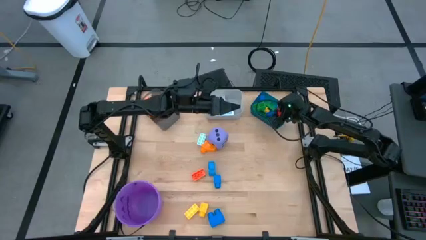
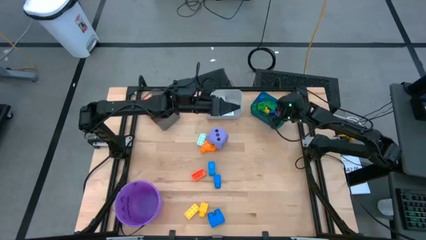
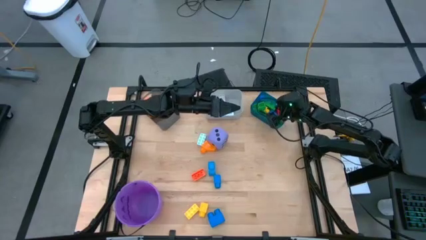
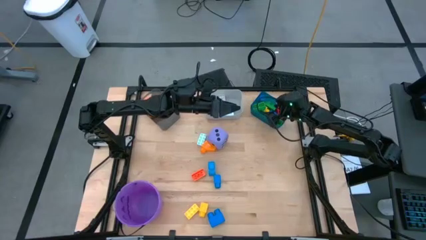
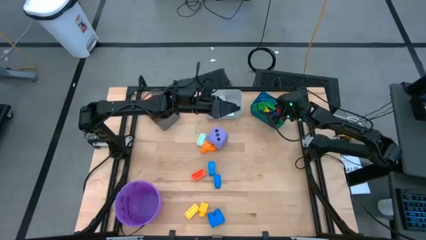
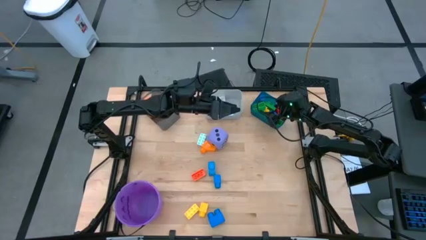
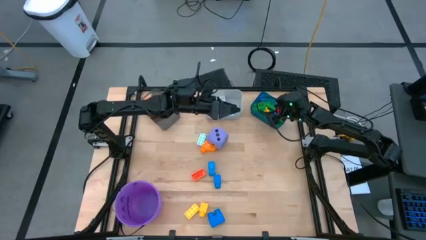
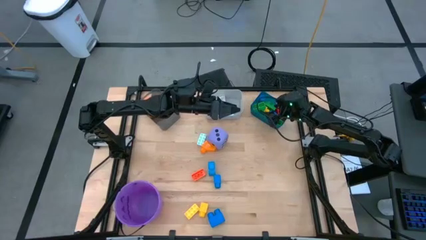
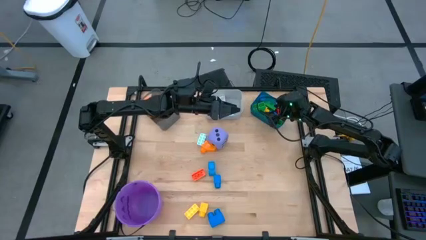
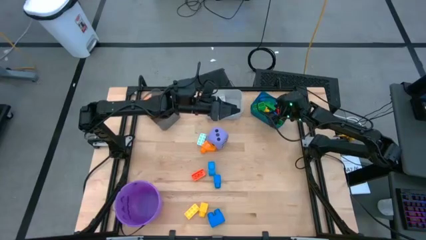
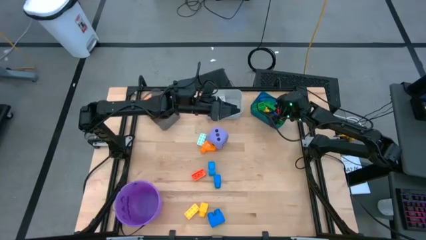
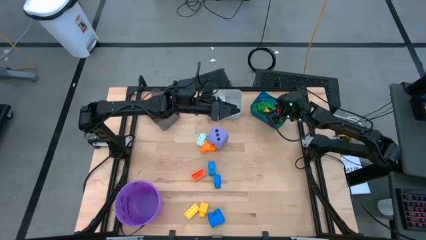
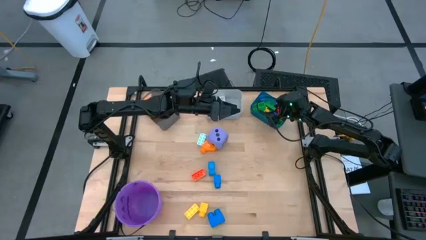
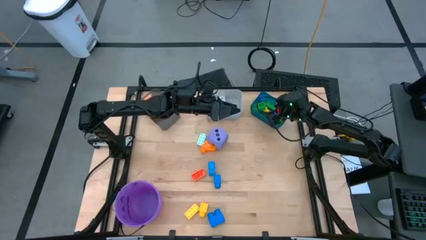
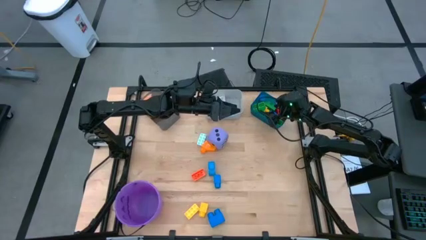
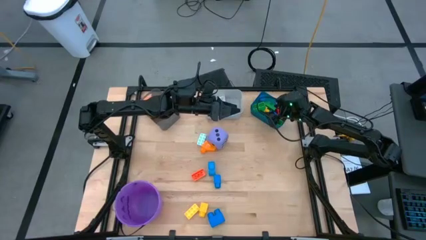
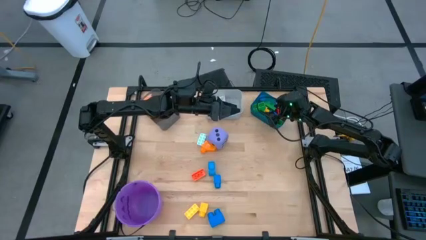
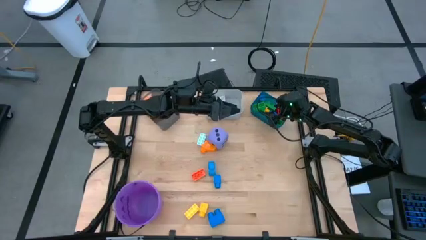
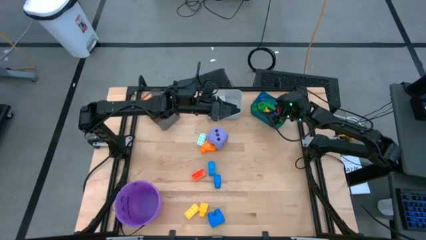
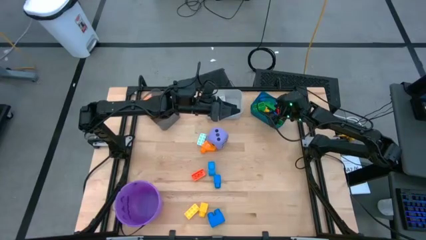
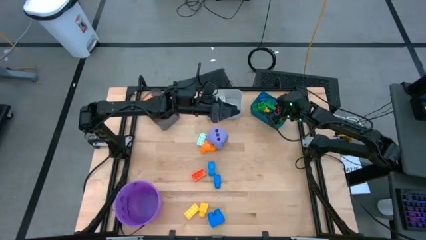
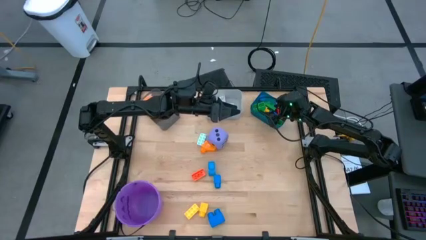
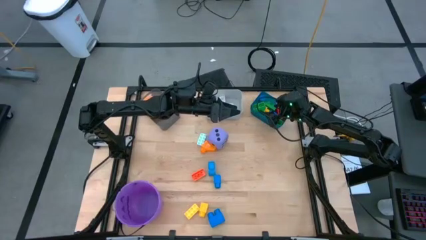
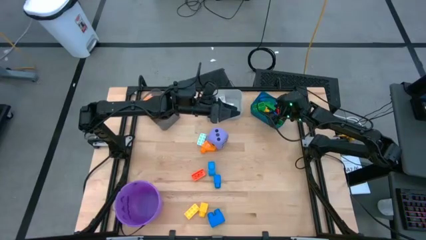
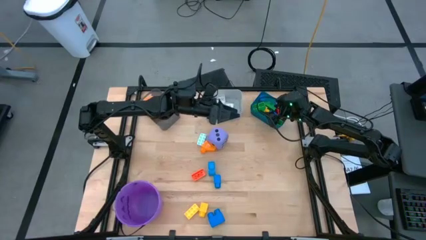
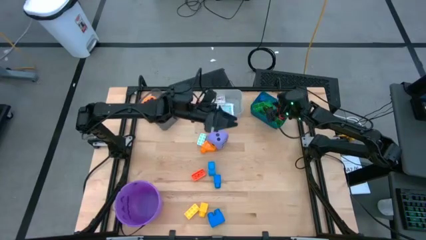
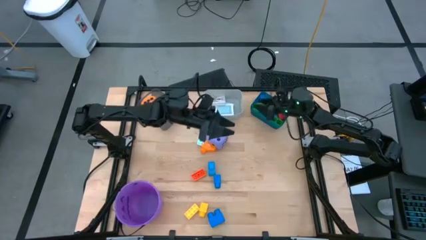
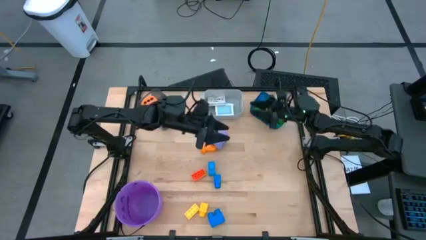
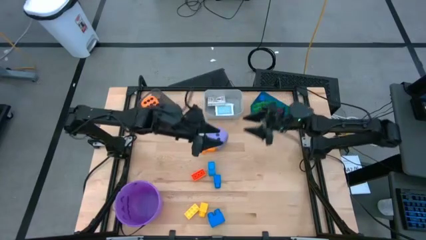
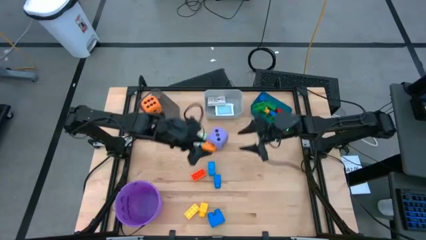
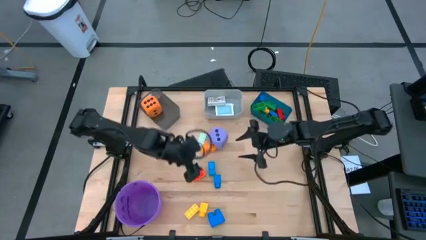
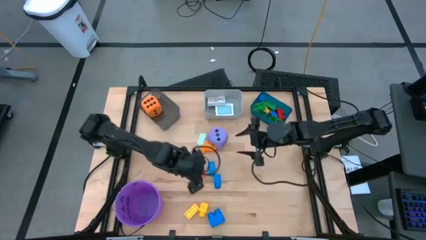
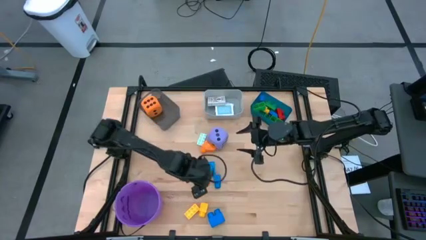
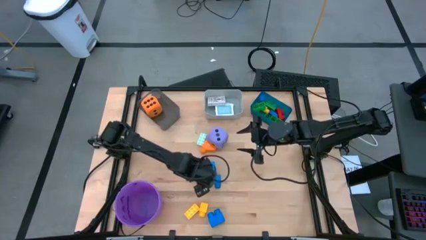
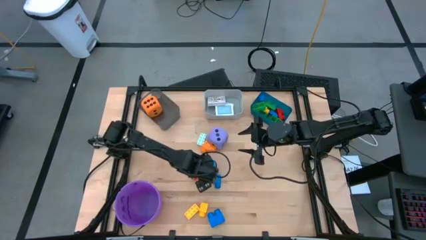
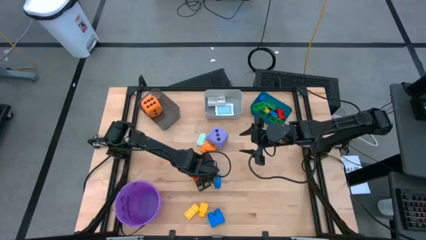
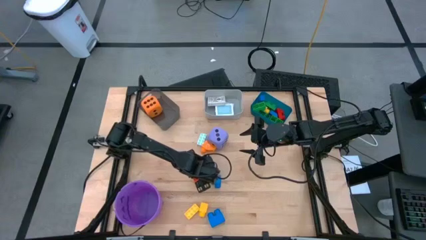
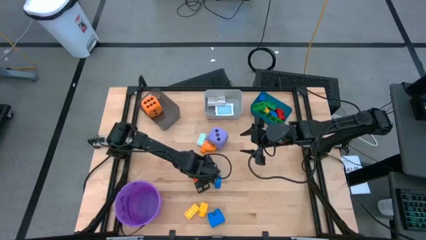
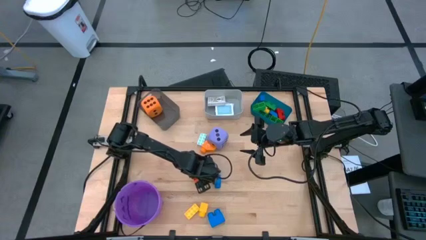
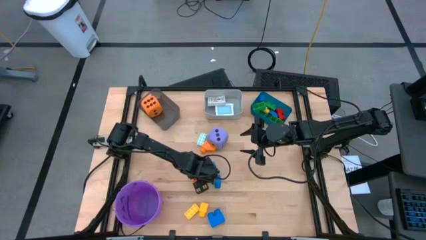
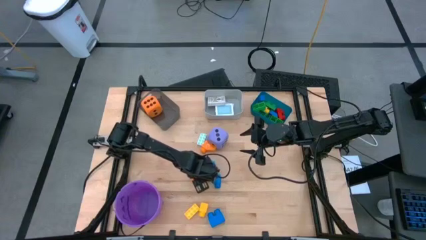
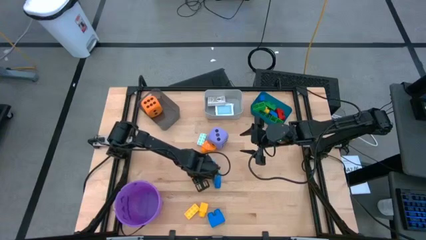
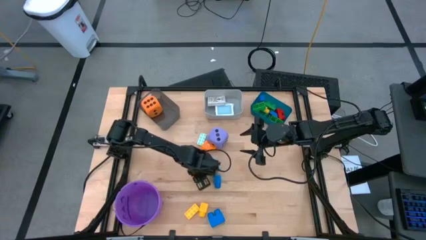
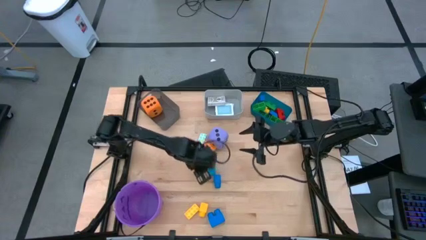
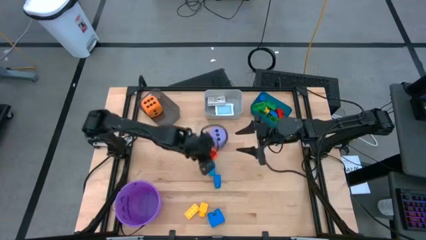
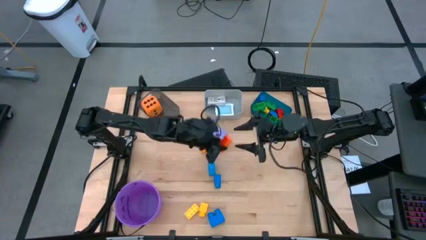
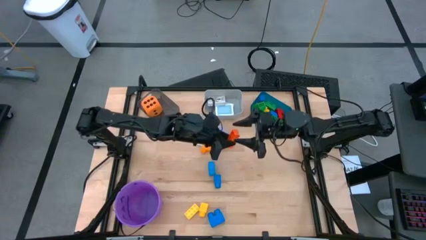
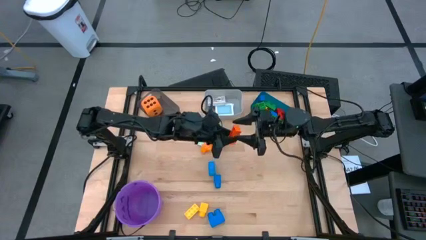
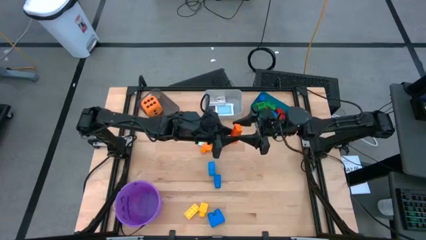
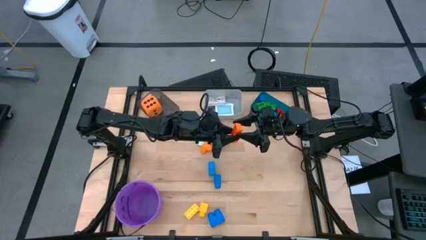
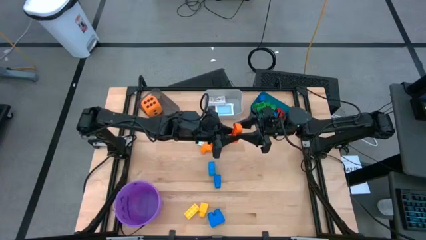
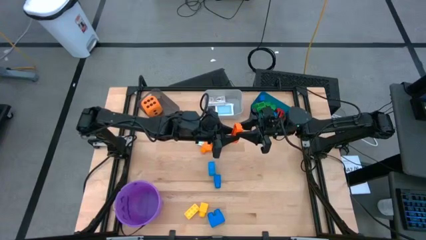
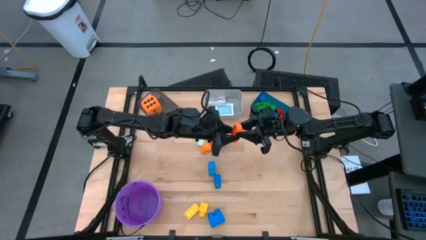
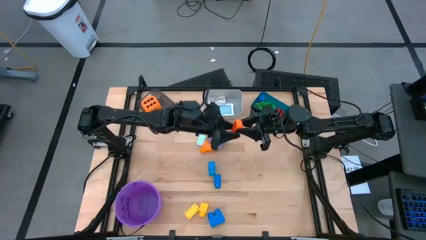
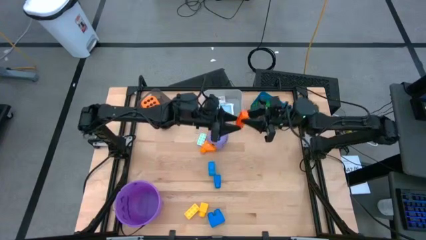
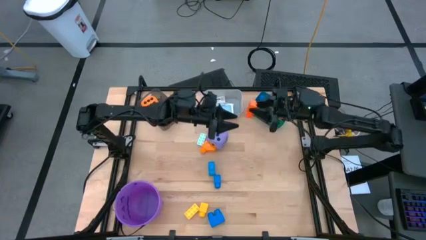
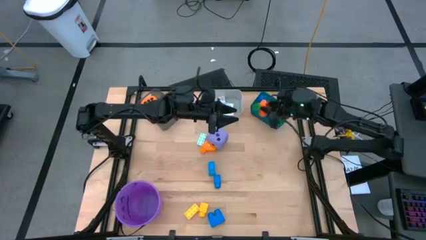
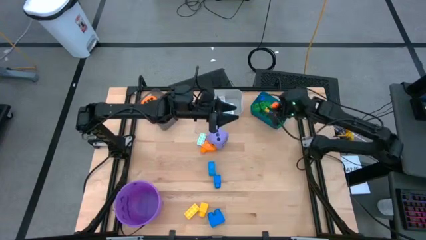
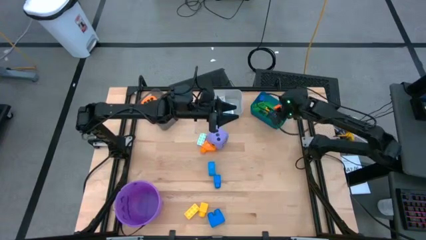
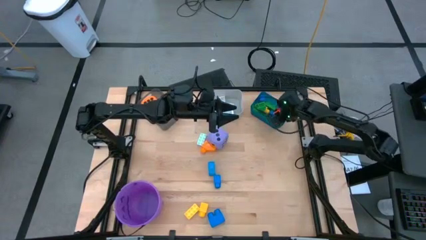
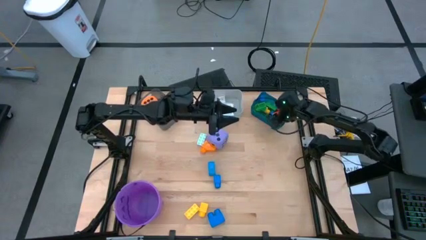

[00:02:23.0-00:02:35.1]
Task: Pick & Place Toys
Put the orange game piece into the blue bin

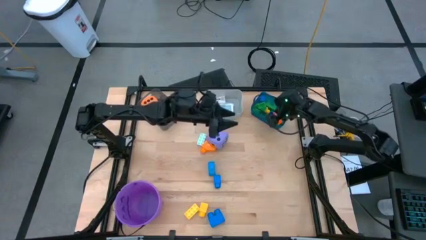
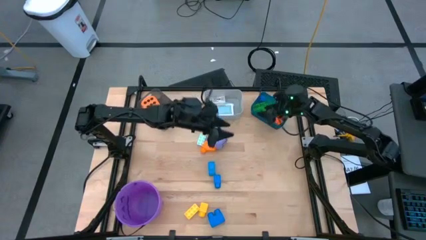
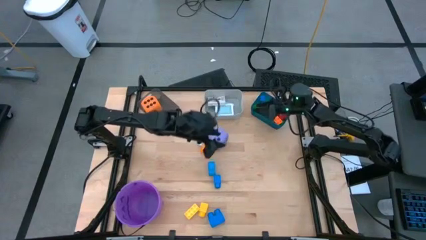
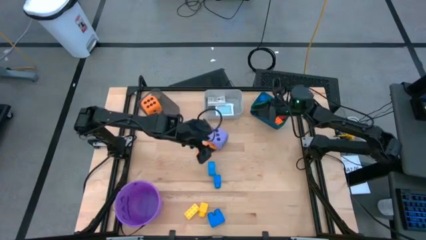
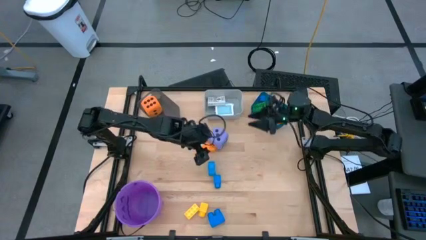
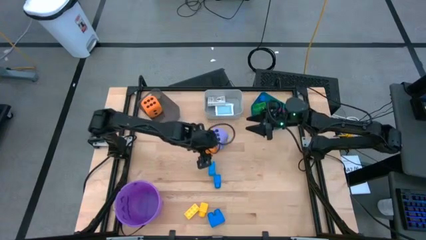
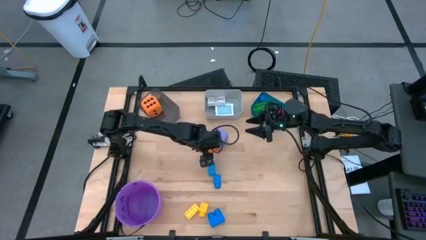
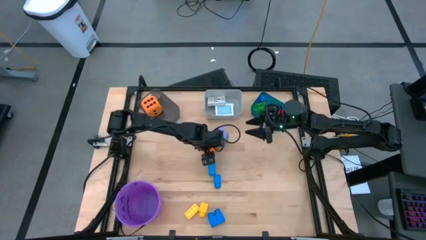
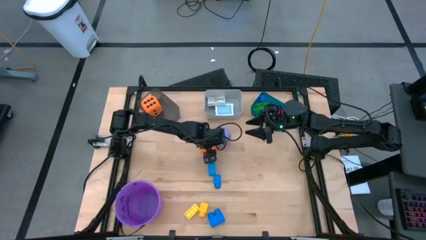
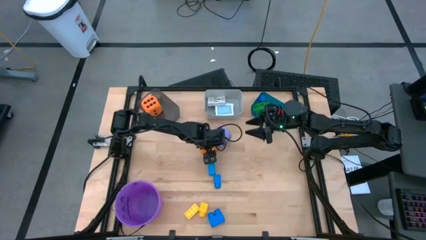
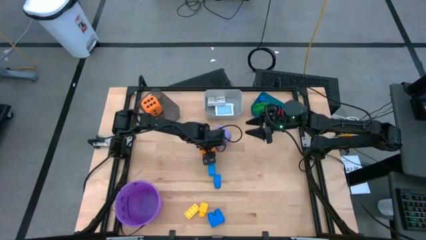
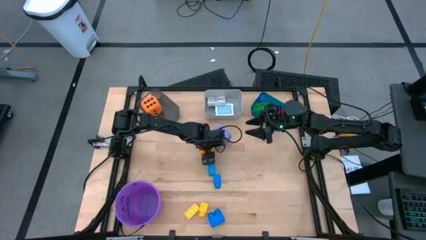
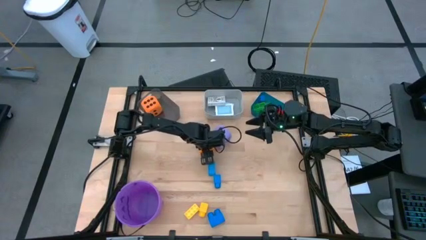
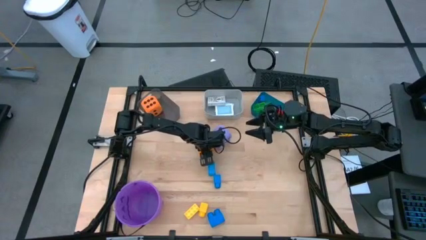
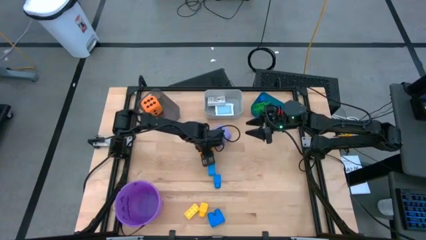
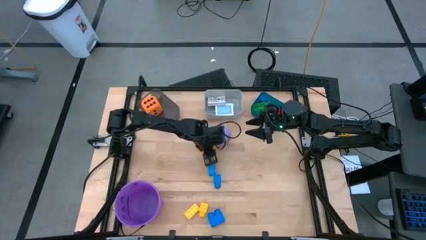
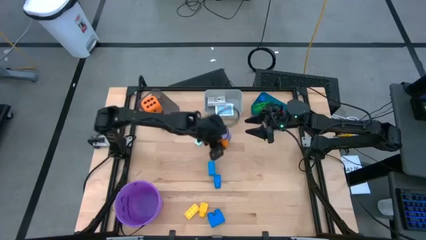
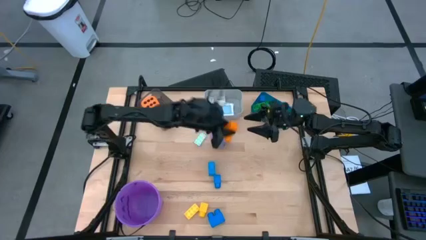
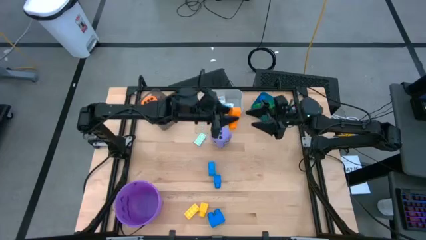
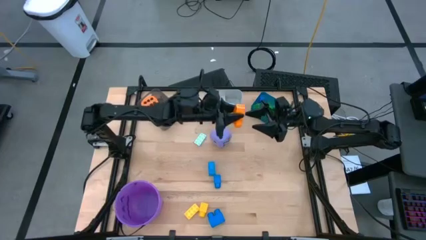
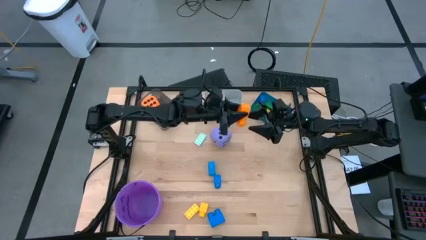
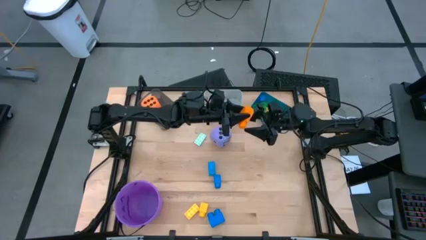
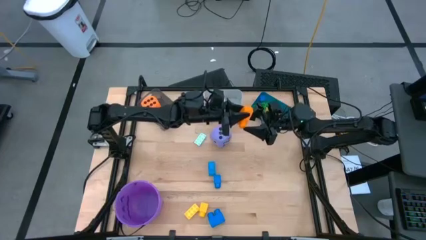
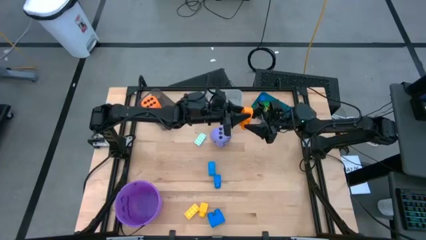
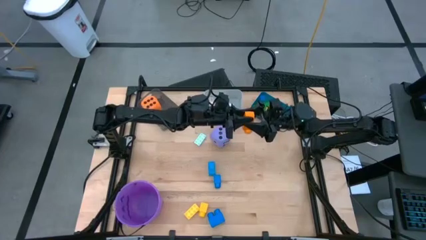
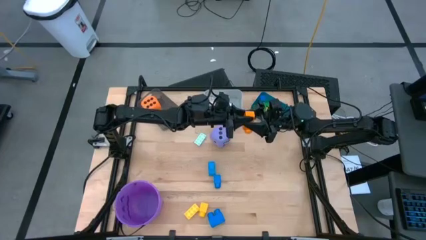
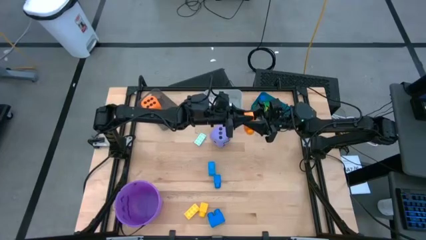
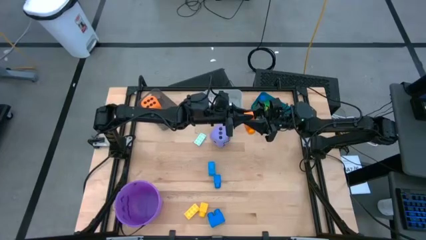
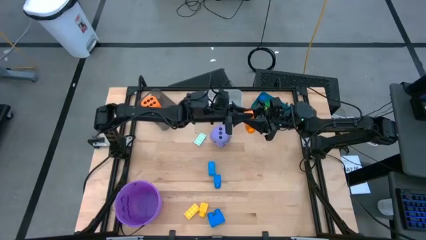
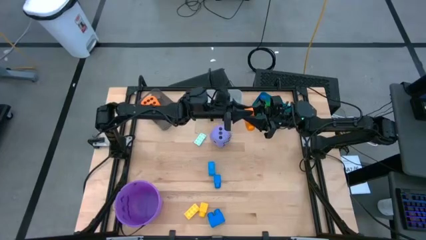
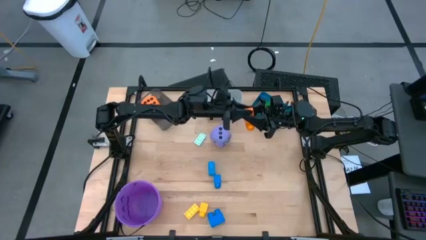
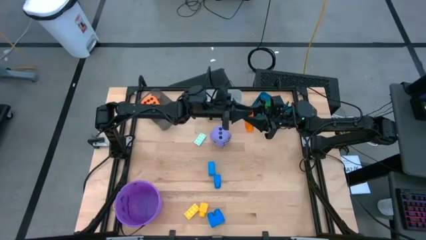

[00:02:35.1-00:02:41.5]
Put the orange game piece into the blue bin
